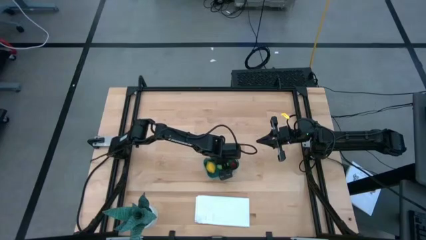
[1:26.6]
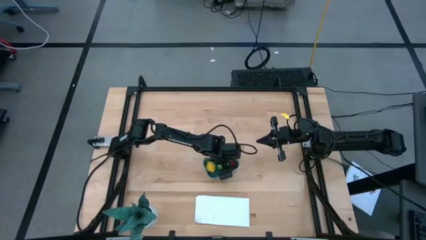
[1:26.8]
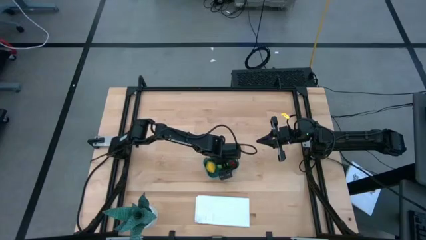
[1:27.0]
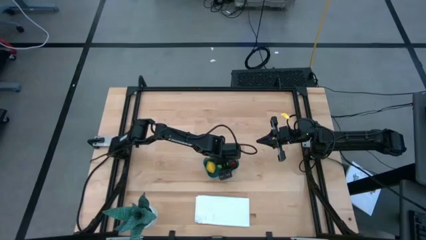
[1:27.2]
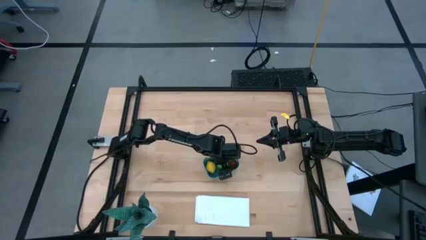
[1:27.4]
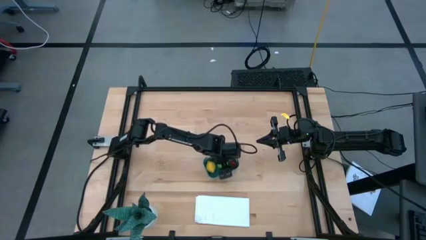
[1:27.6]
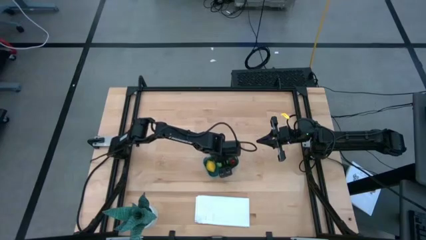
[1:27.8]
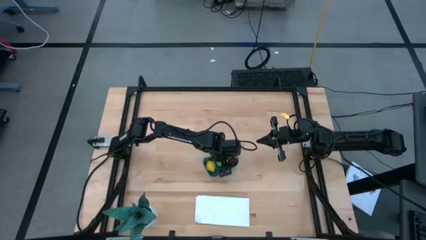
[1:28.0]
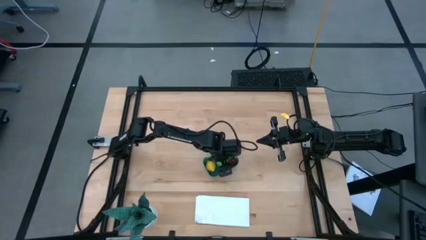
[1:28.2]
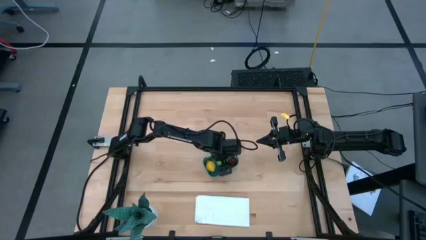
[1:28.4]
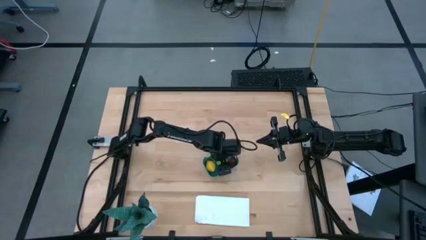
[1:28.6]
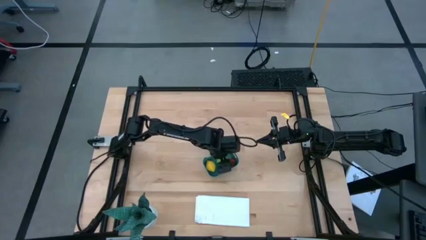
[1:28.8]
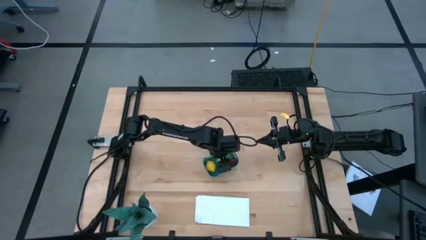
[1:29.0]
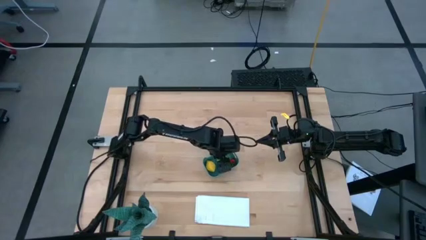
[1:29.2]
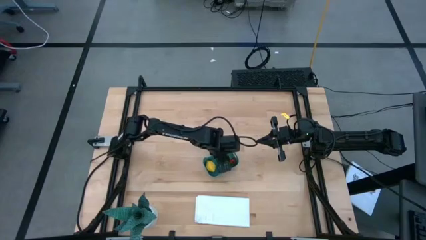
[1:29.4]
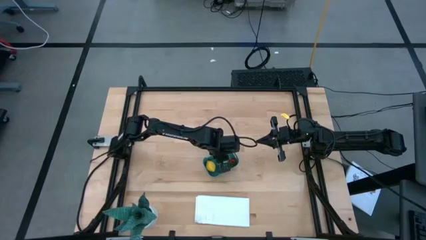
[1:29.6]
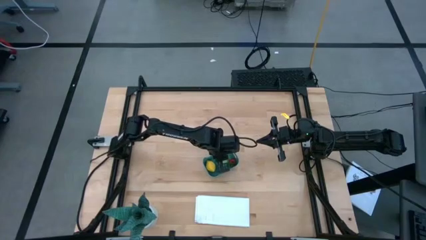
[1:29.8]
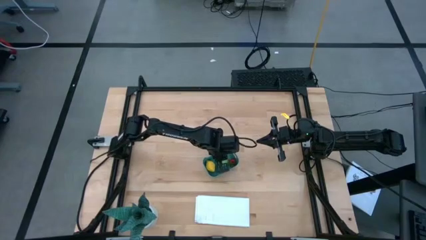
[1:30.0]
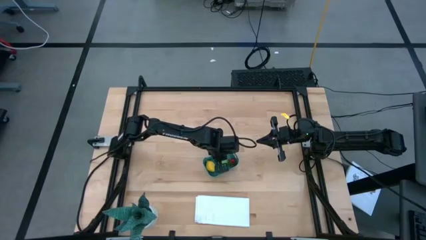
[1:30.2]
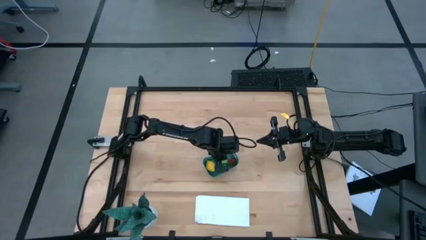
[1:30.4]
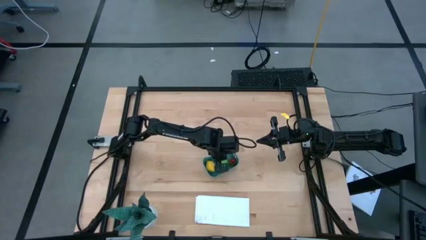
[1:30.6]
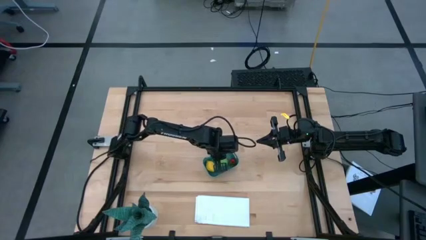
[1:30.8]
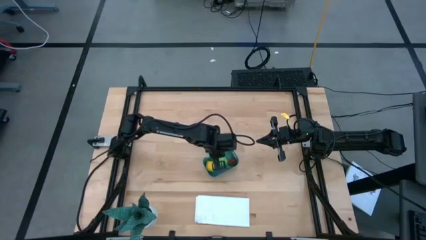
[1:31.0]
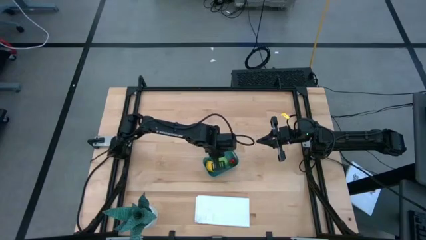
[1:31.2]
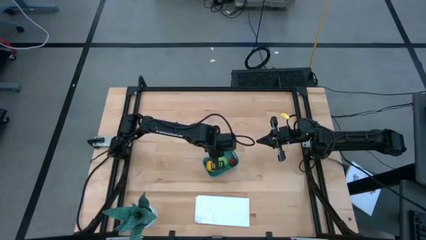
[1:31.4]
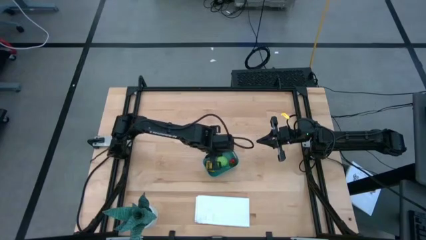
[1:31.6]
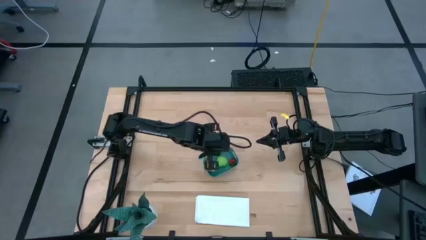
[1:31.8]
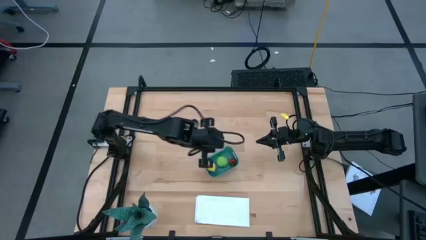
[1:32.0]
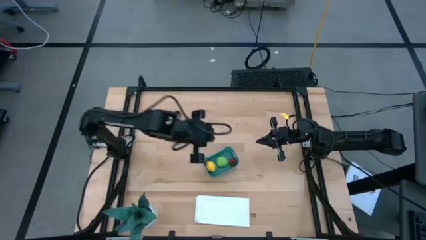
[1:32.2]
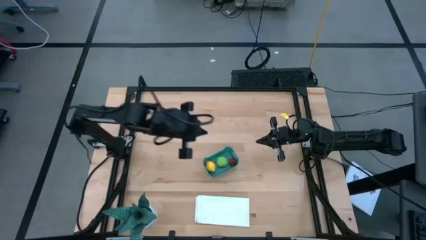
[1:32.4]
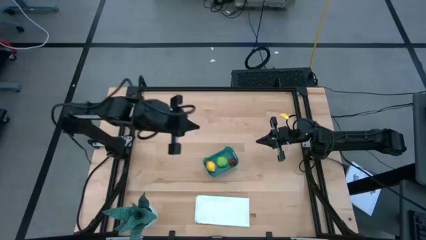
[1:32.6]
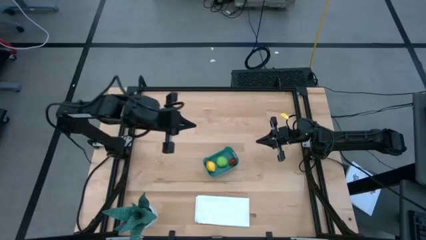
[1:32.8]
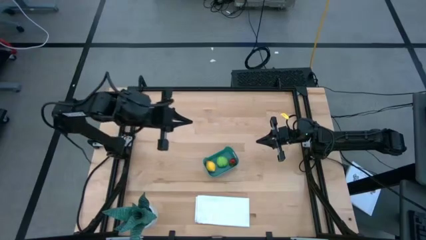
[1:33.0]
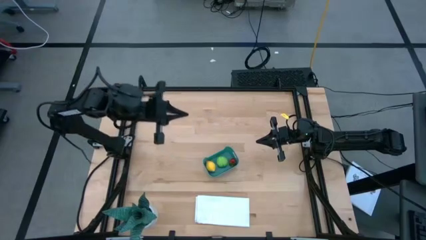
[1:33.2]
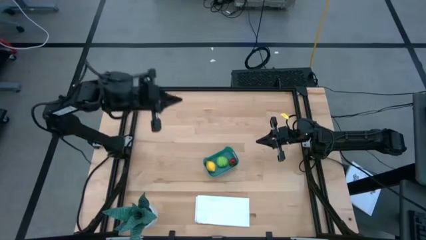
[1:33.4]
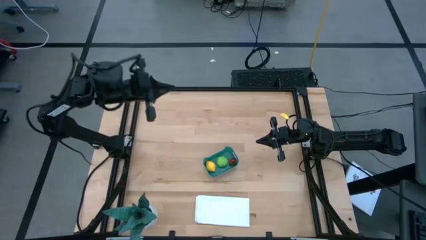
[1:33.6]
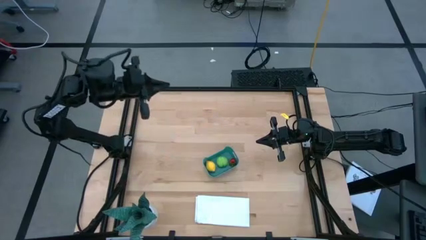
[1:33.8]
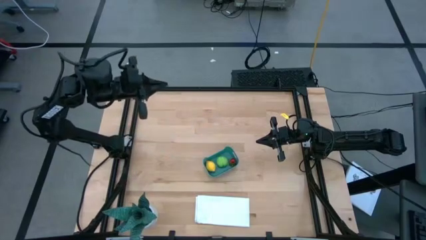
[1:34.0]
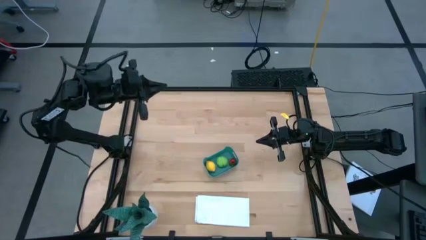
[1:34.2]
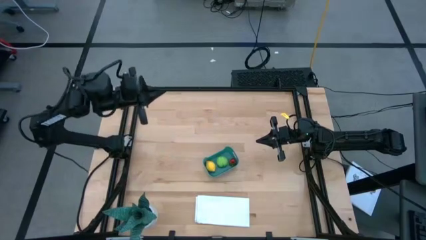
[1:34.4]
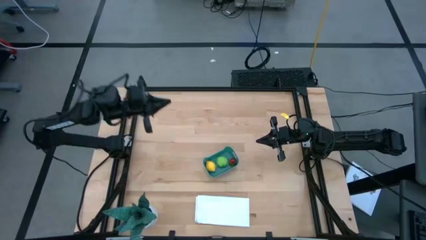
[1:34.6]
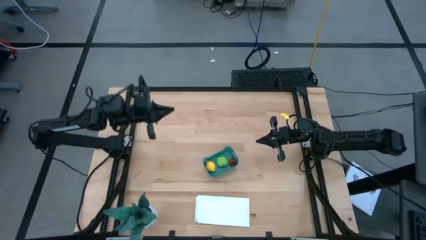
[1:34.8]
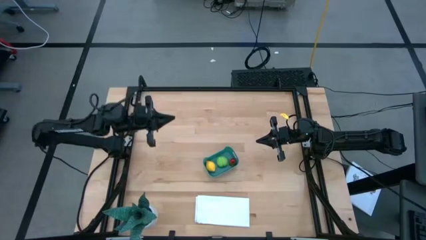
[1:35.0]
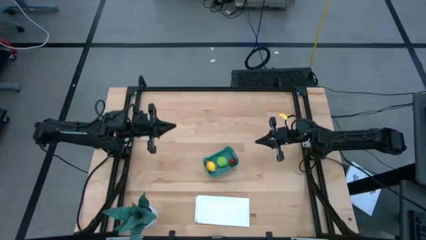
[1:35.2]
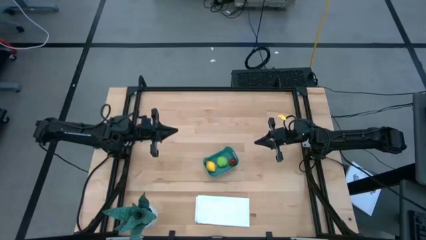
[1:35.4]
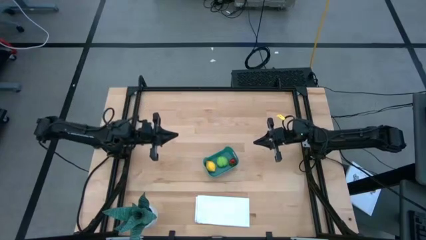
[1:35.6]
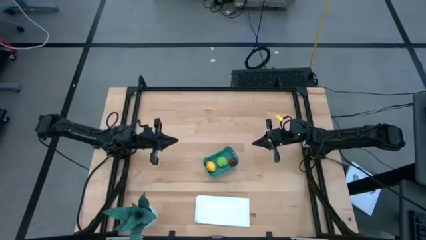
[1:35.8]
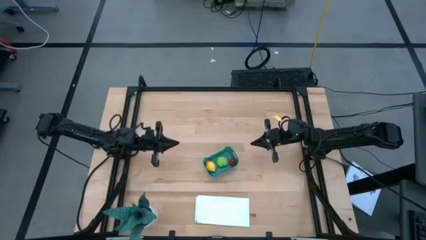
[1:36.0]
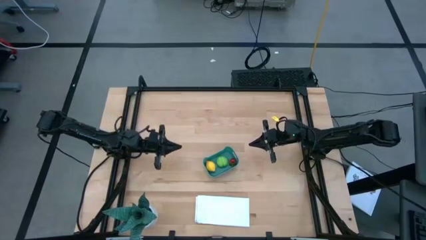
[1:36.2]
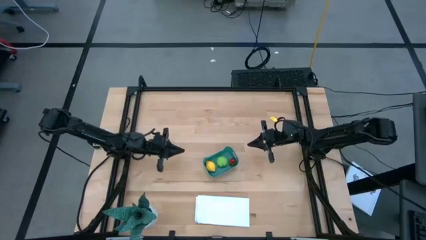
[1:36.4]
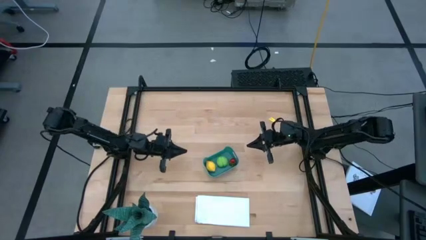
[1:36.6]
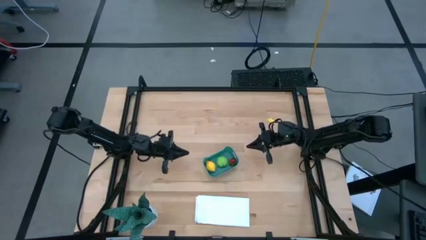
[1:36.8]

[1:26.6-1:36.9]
Task: Pick and placing Produce into tupperware
Adjust the green bin
